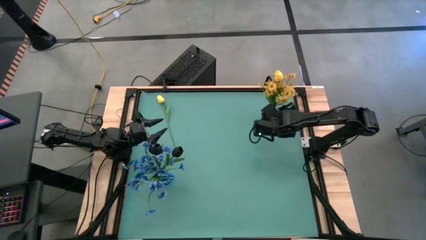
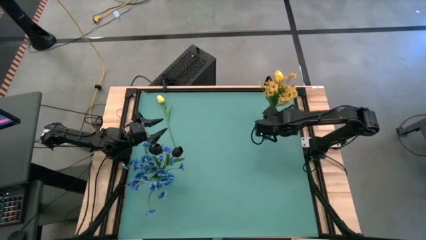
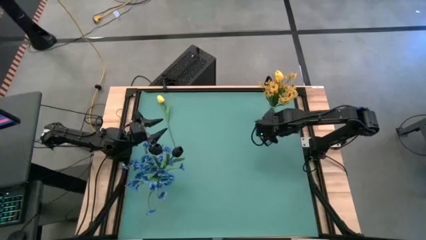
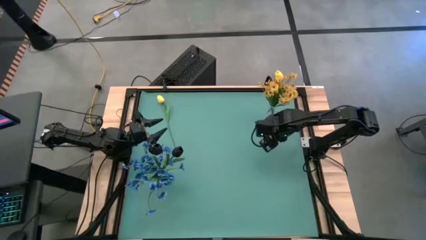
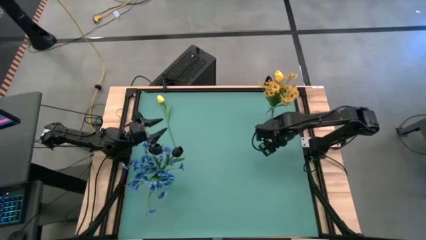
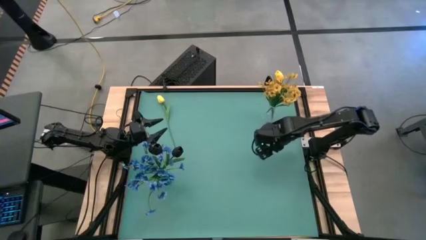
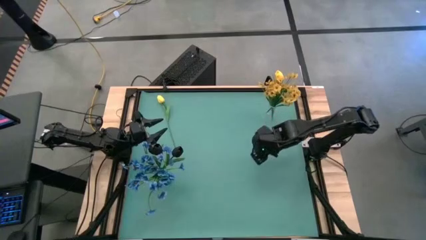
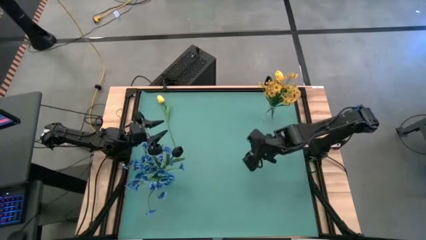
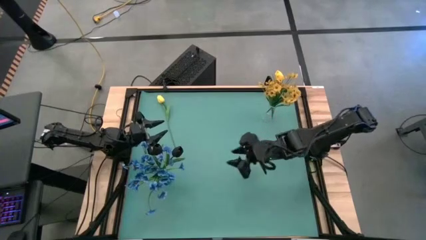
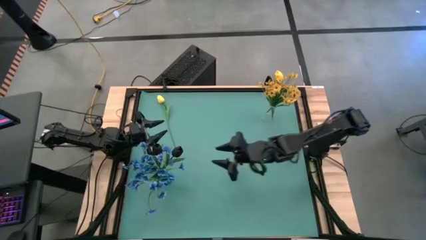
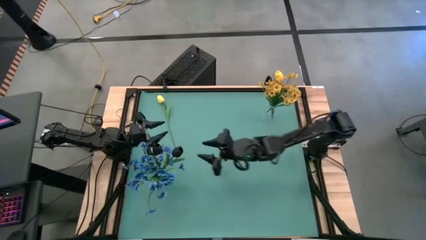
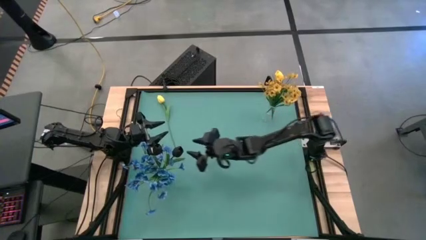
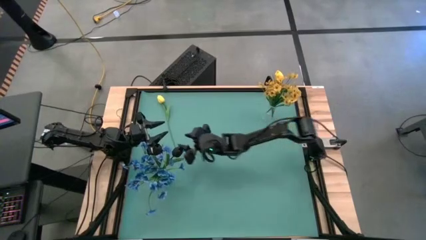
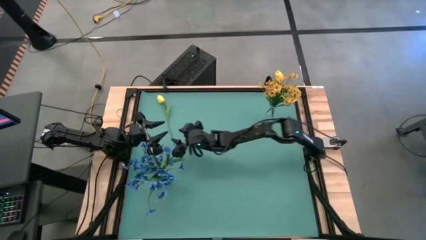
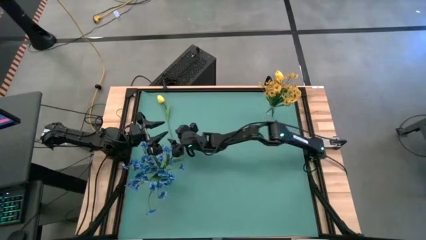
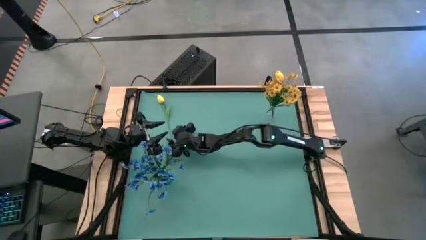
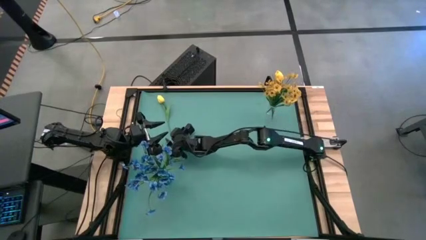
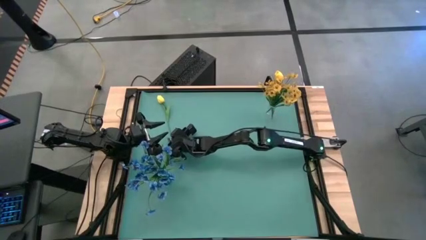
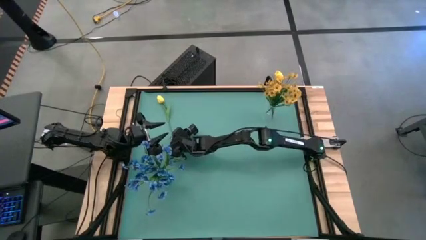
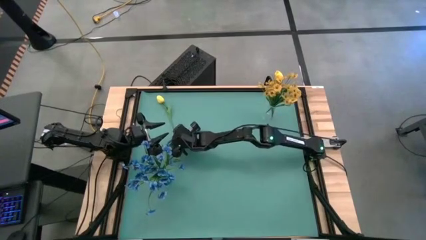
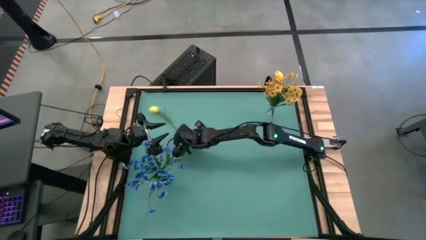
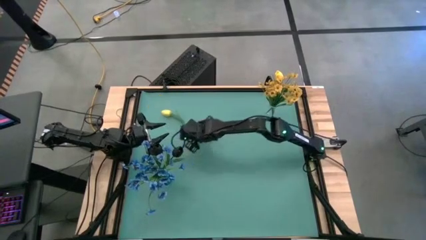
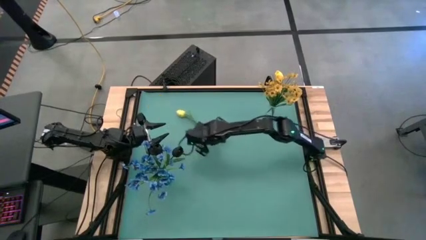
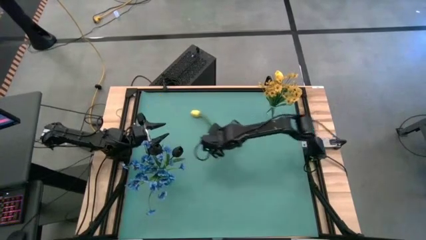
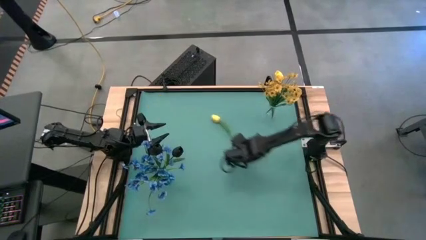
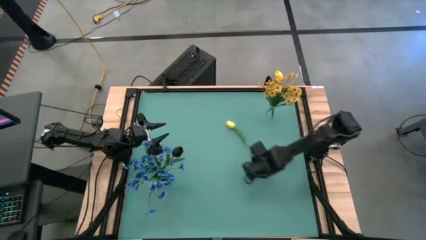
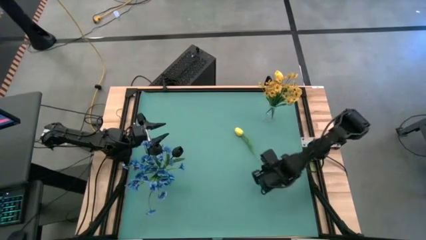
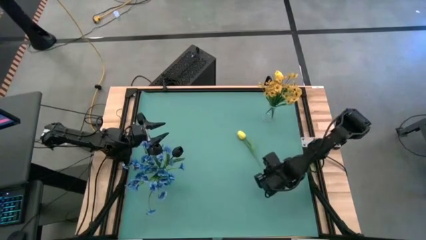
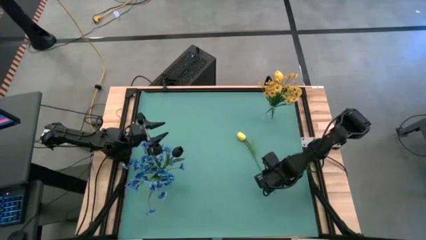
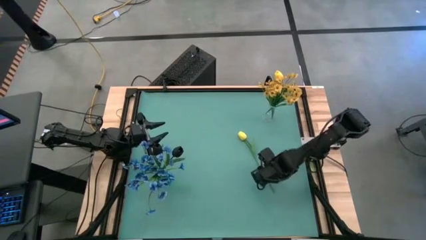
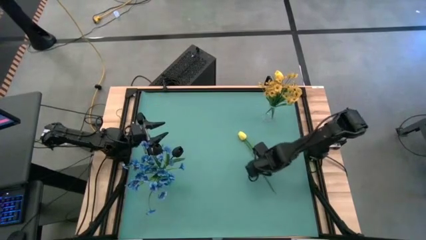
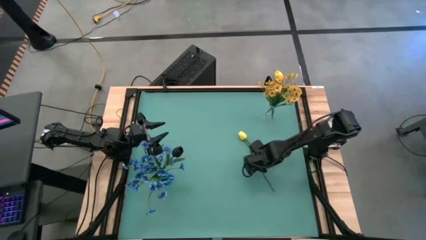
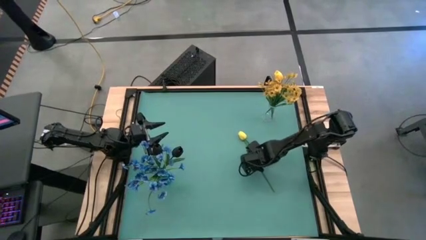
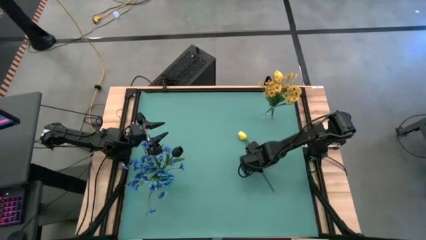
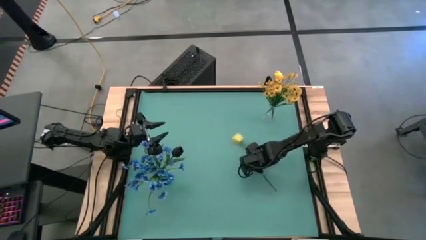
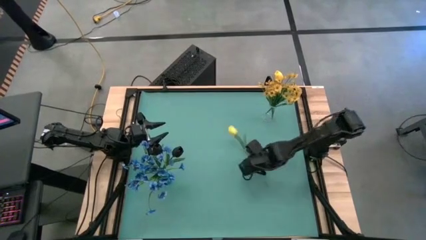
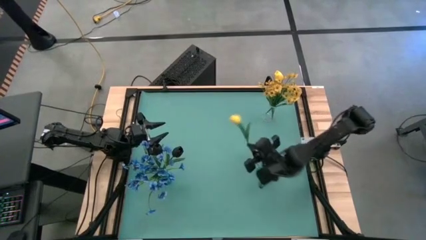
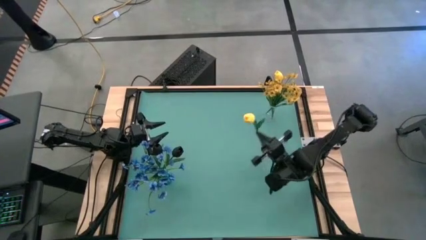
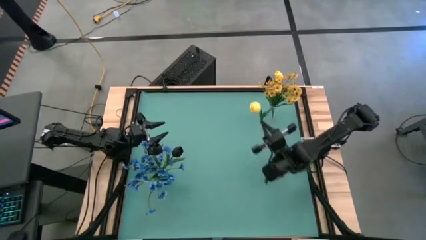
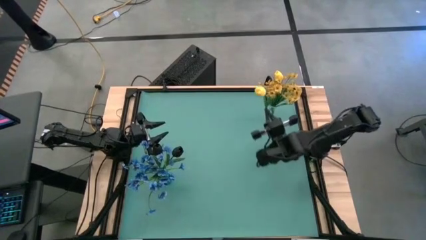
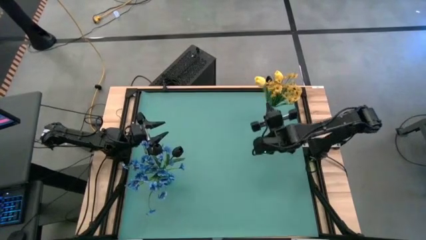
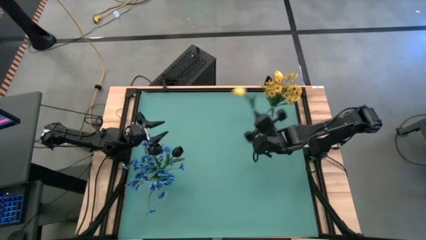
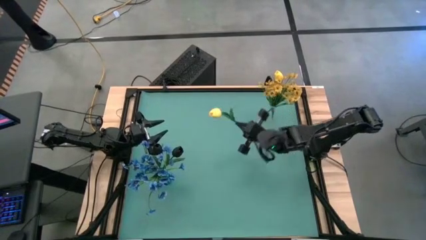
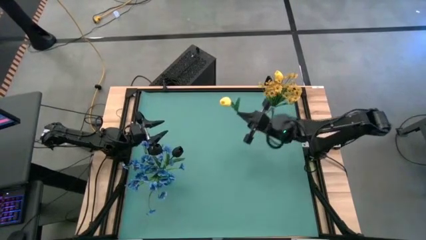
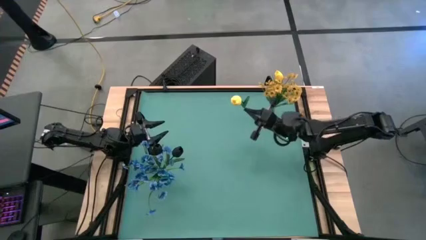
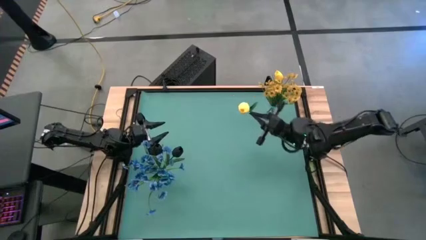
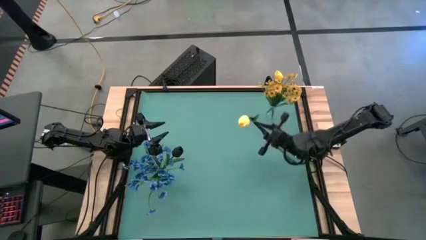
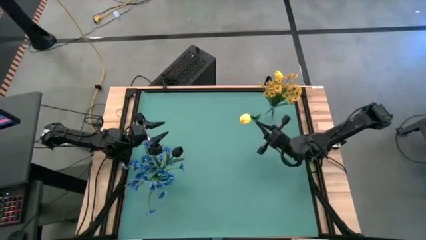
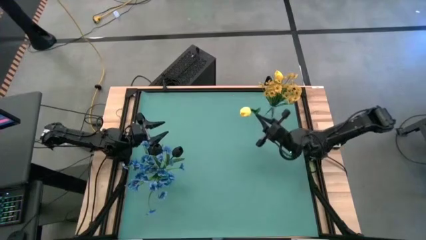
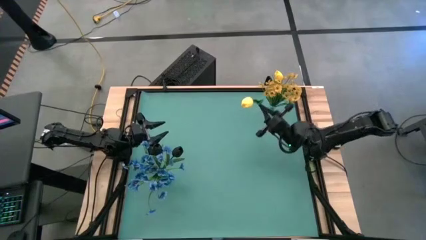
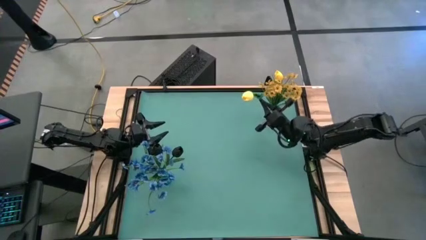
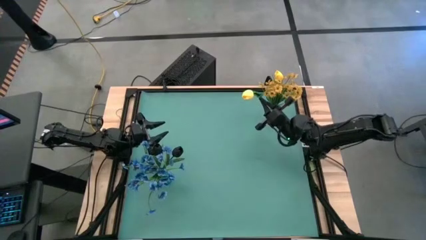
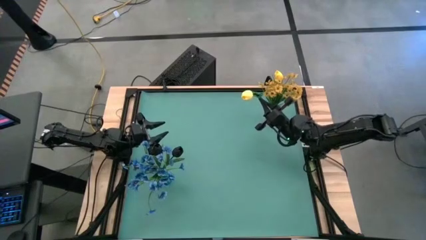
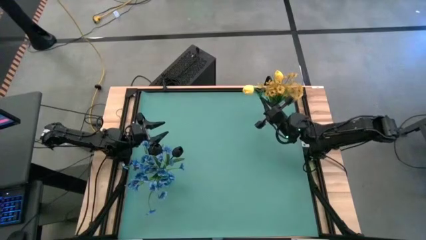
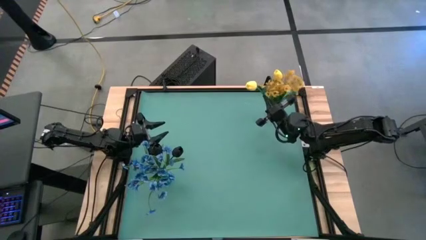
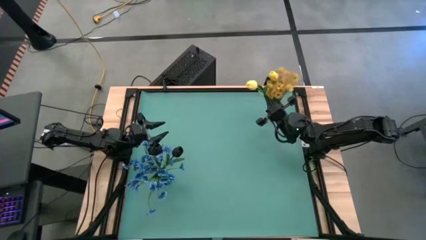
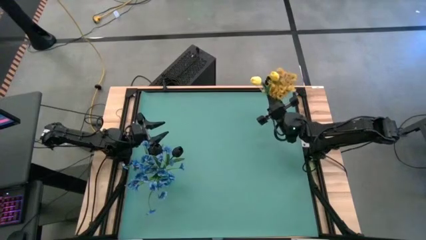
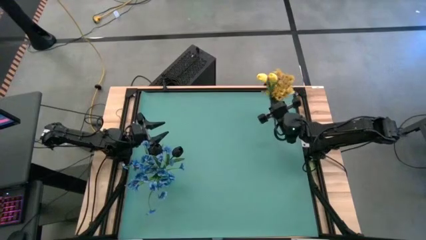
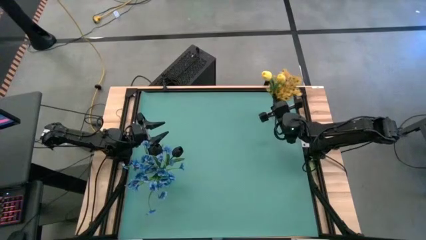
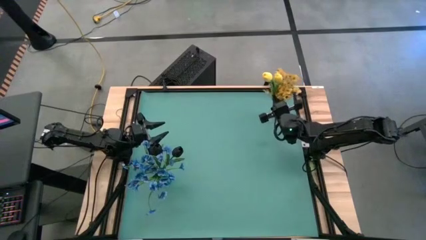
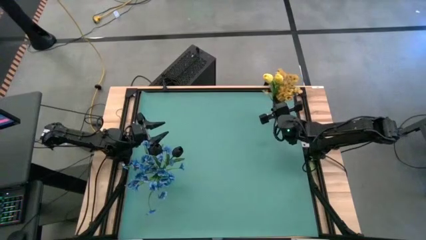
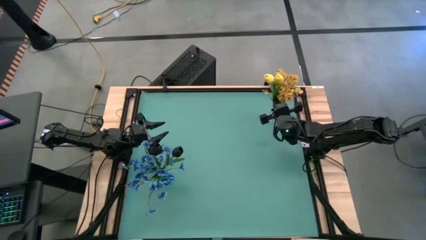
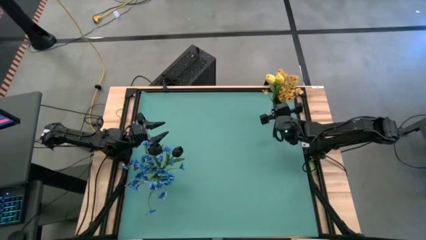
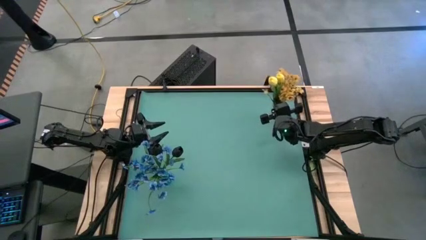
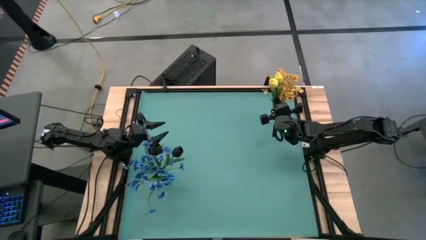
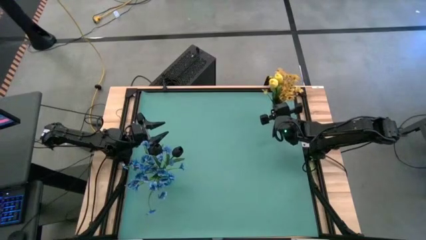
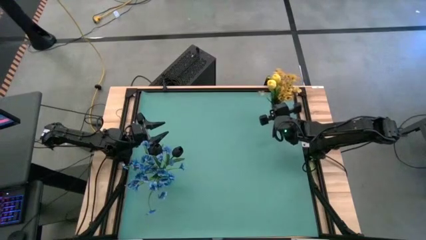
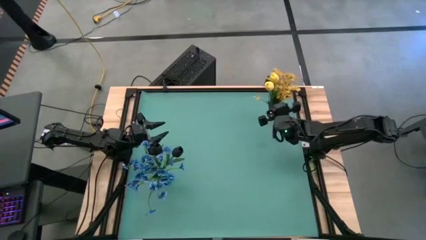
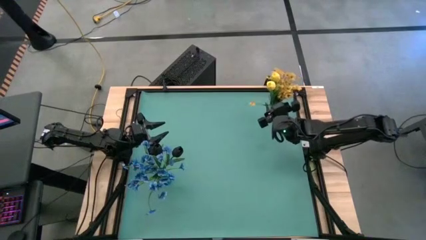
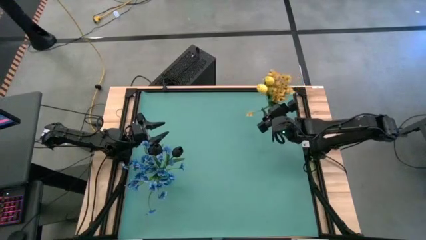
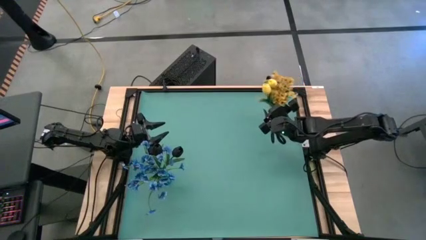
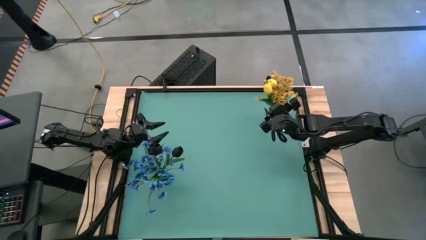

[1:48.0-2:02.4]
Task: Sort flowers into vase by color
Put the yellow flower into the transparent flower vase
